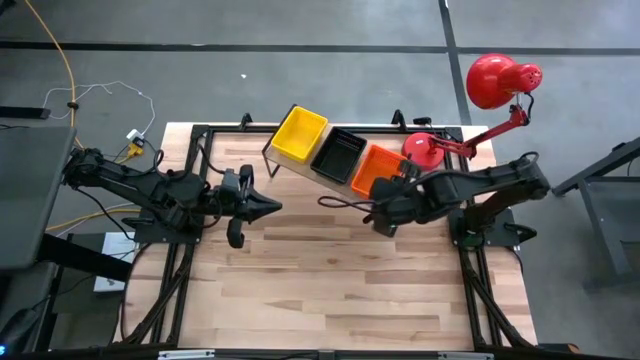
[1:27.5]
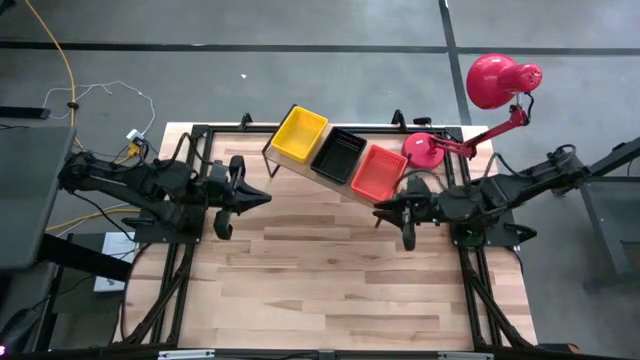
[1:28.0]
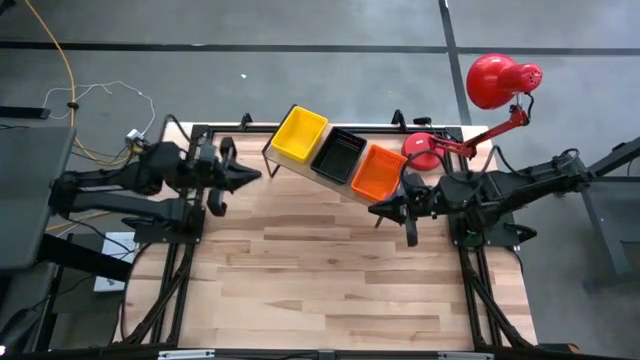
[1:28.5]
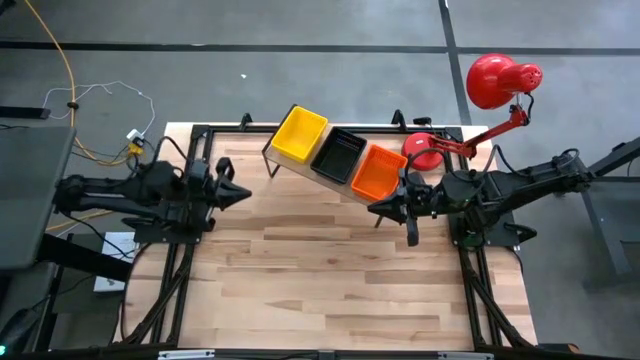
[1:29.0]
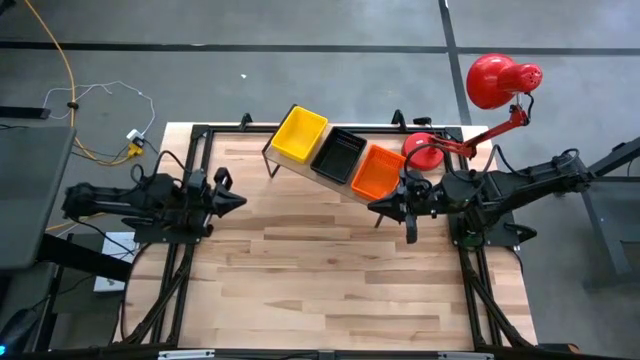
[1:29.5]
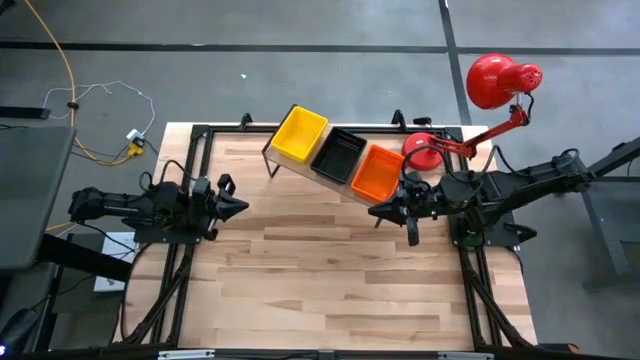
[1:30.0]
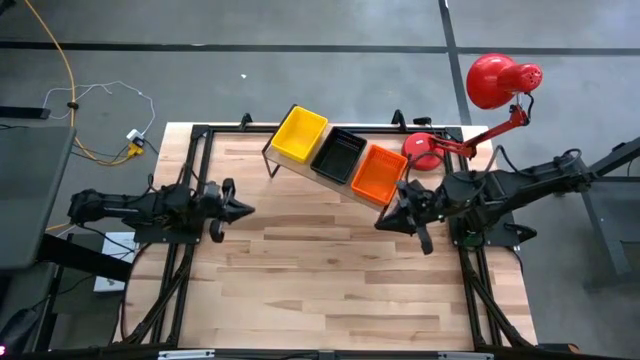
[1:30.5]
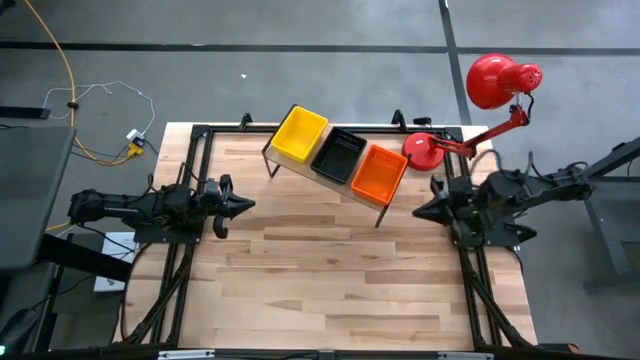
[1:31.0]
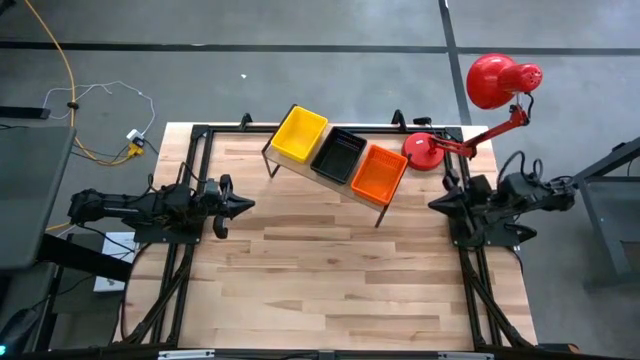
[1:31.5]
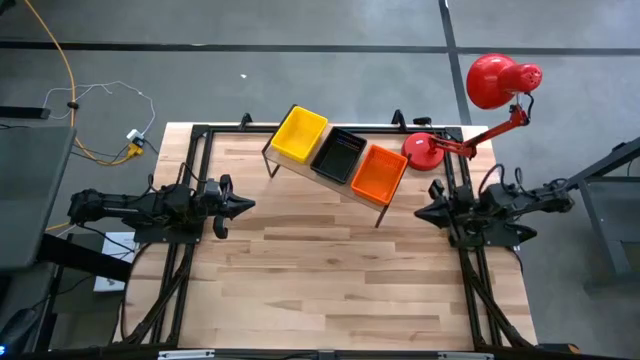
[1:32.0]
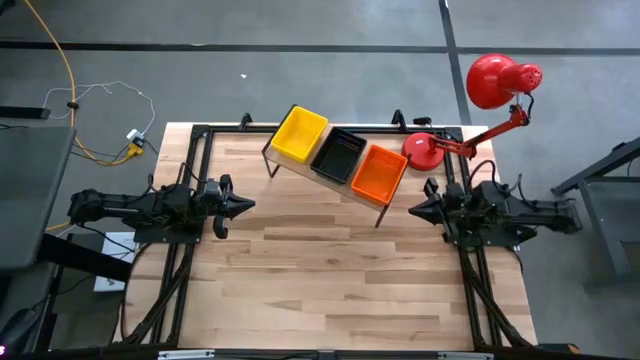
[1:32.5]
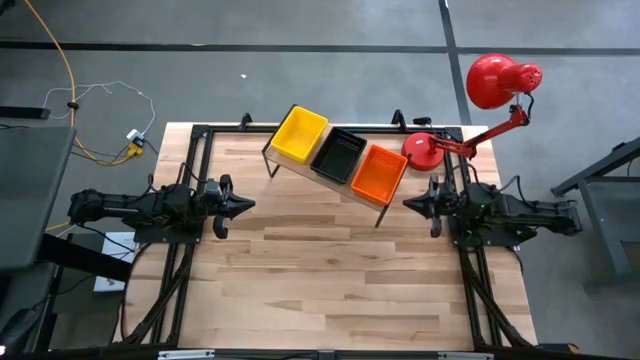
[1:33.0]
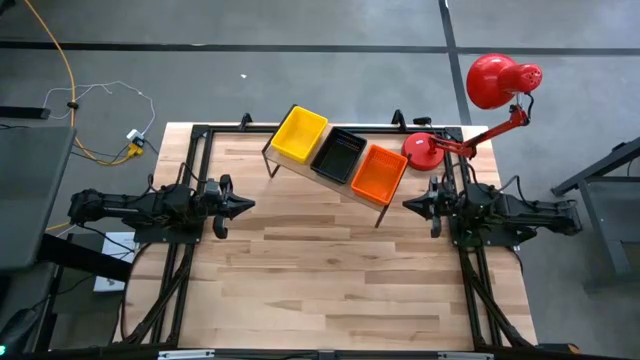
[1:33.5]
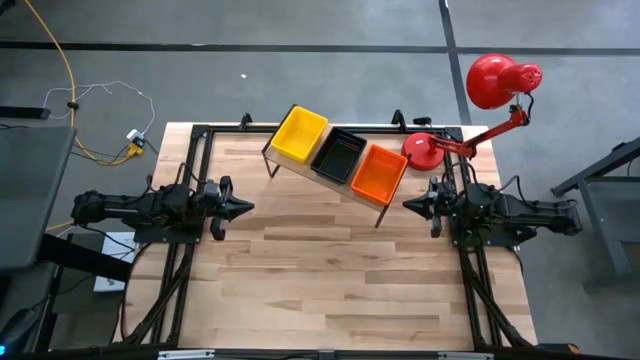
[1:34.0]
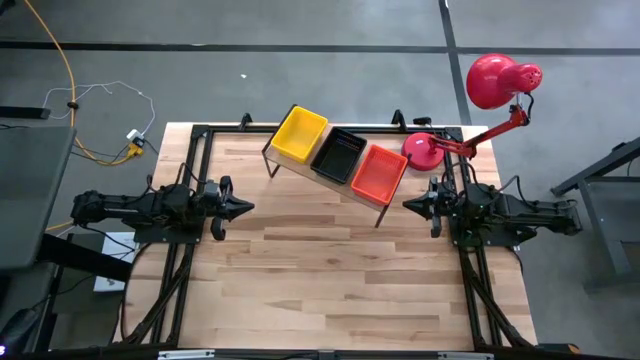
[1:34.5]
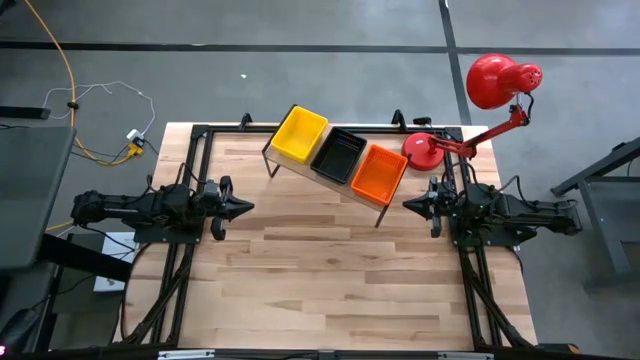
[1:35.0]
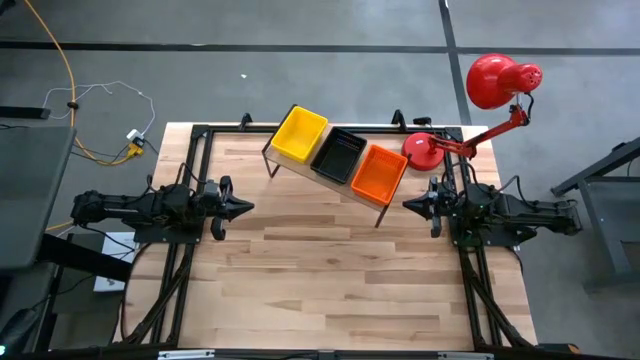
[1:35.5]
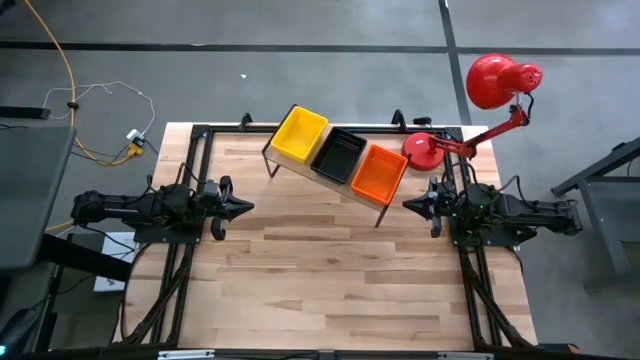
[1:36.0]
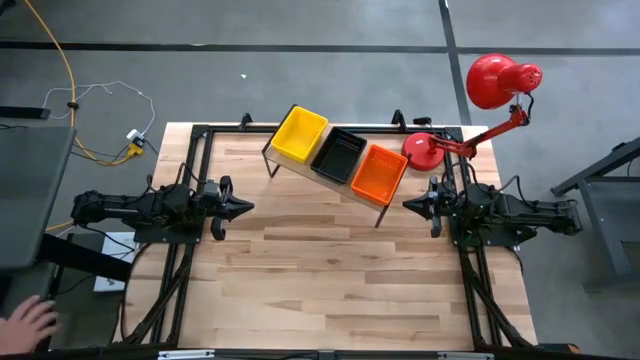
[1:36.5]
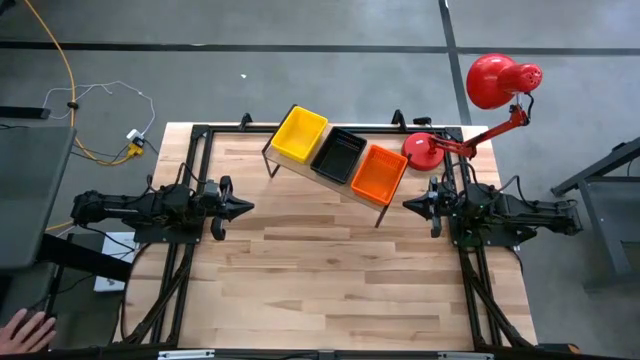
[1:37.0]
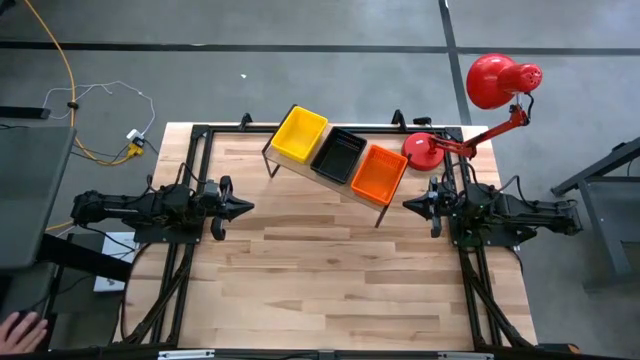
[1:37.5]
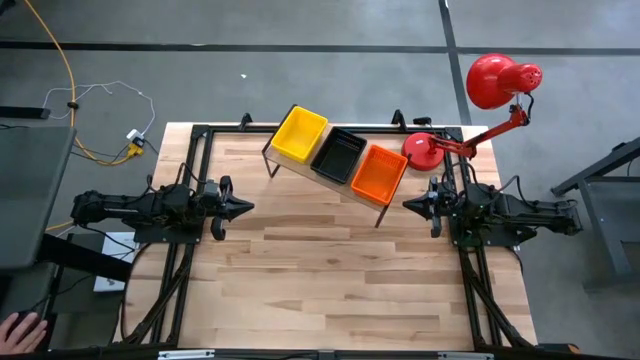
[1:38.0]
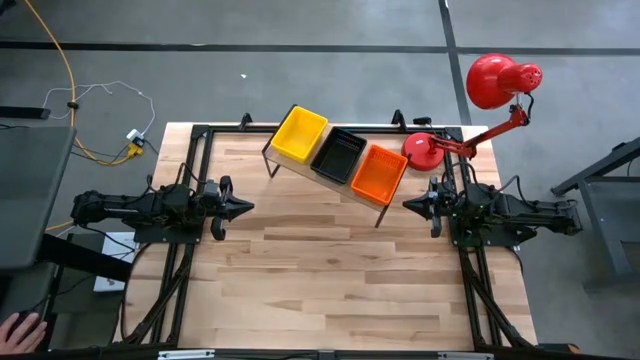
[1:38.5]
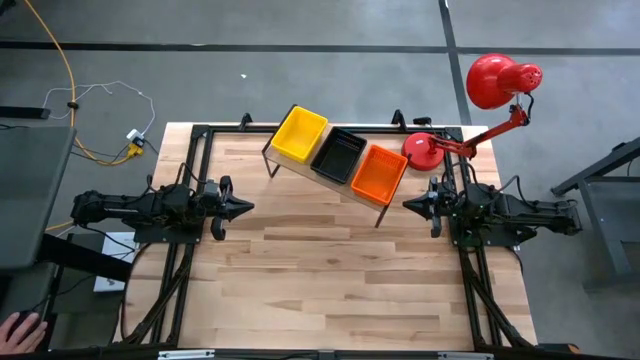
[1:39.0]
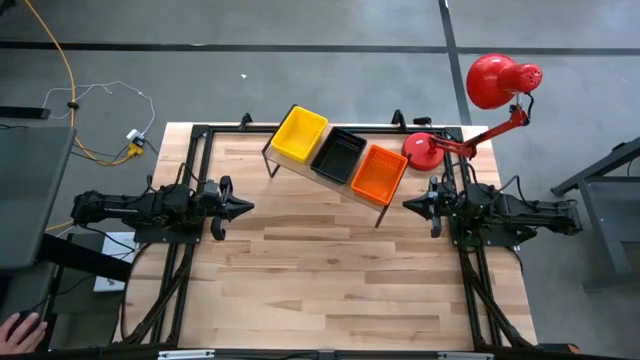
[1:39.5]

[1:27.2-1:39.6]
Task: Stack baskets on shelf by color
Return to Home Position

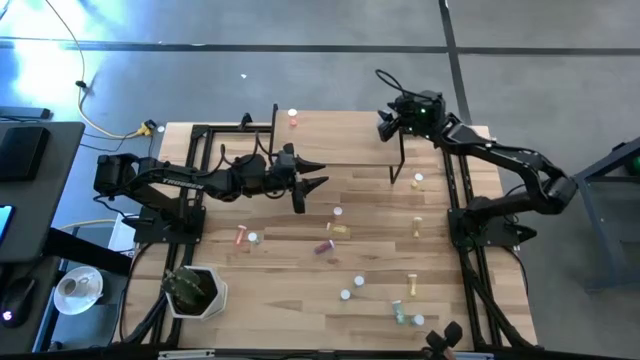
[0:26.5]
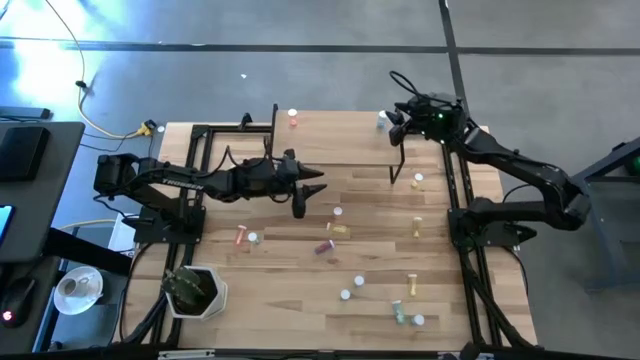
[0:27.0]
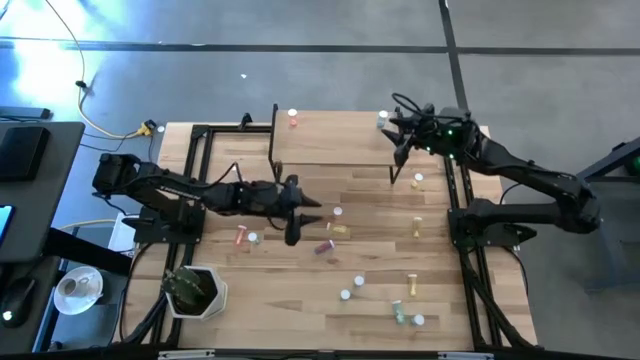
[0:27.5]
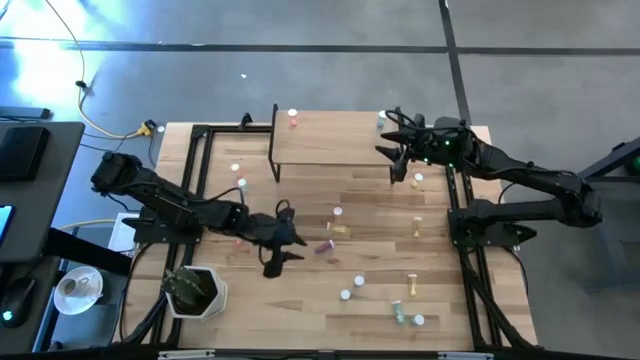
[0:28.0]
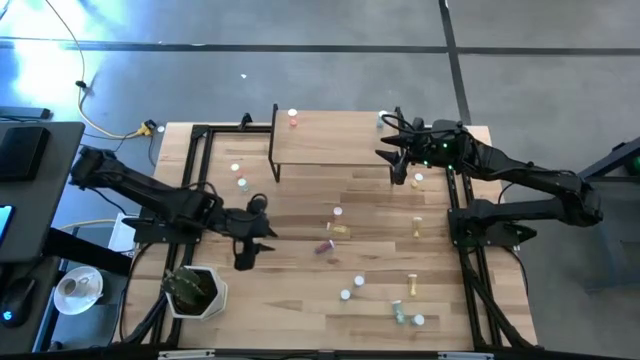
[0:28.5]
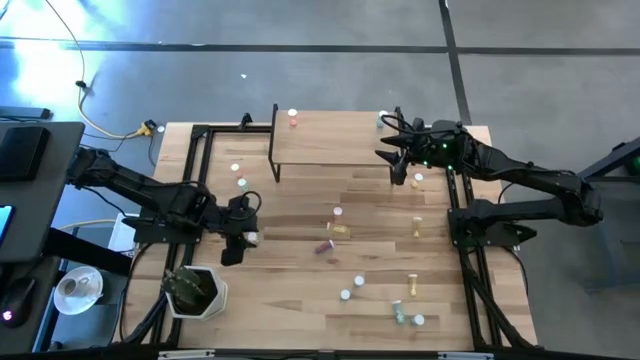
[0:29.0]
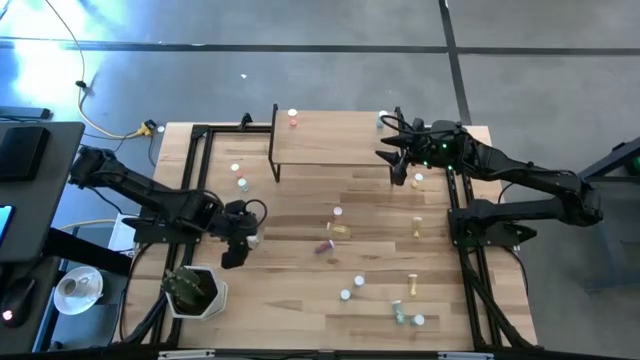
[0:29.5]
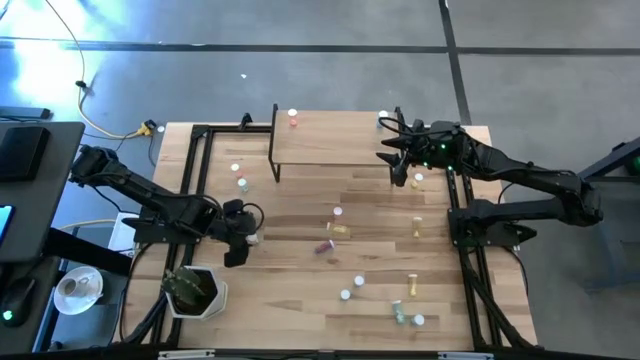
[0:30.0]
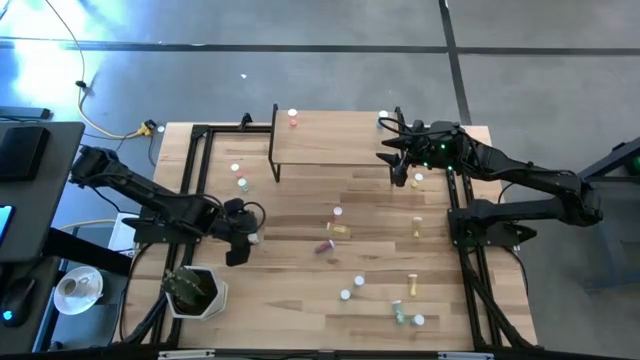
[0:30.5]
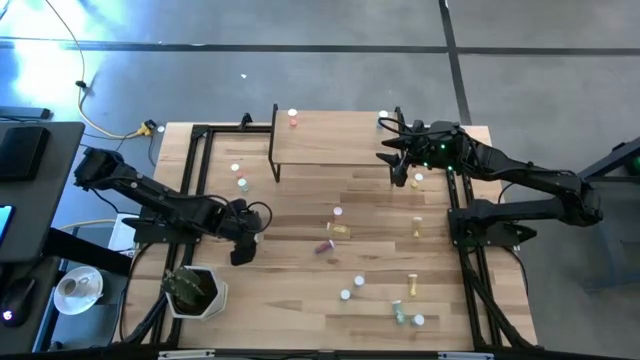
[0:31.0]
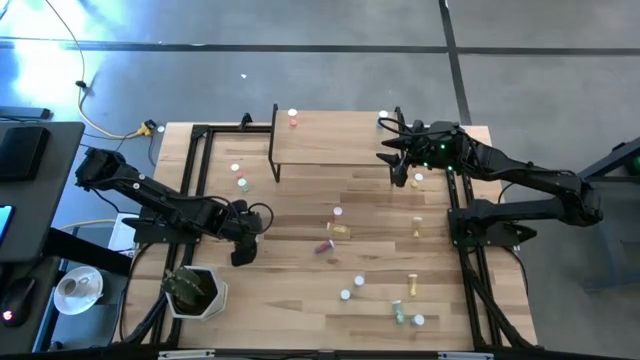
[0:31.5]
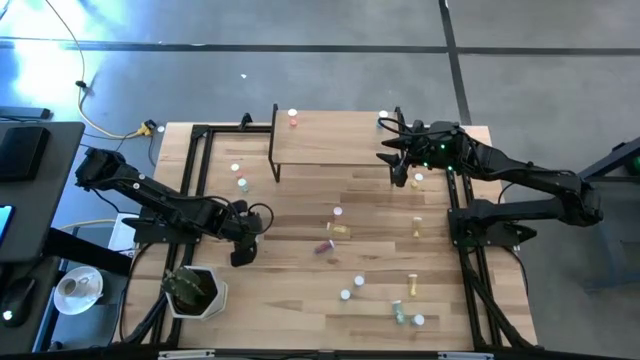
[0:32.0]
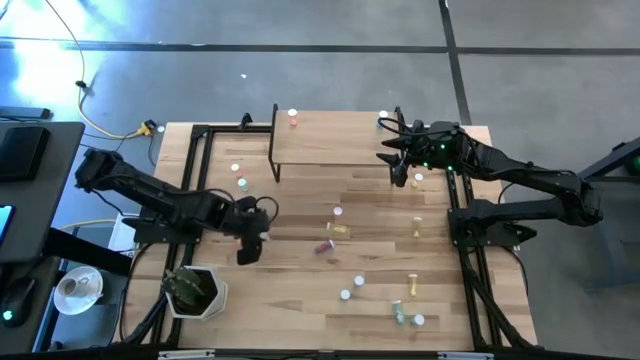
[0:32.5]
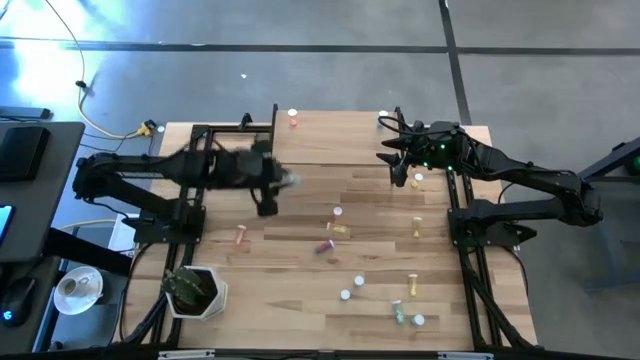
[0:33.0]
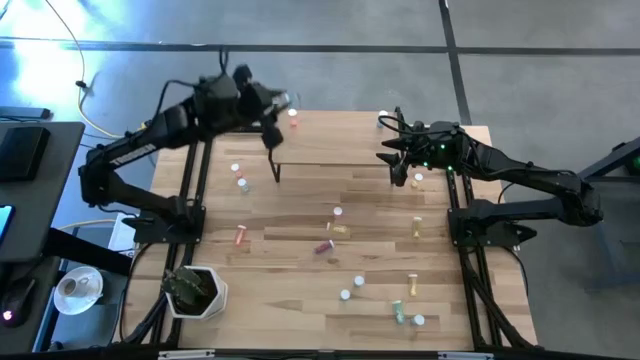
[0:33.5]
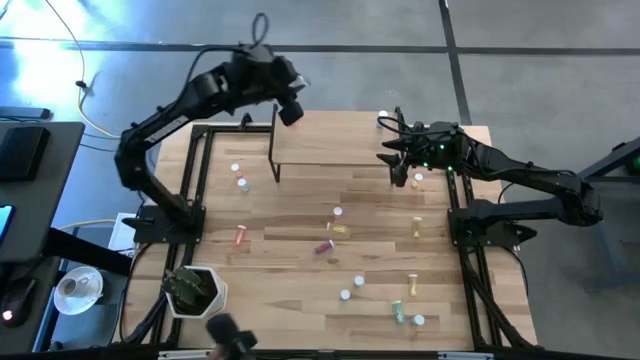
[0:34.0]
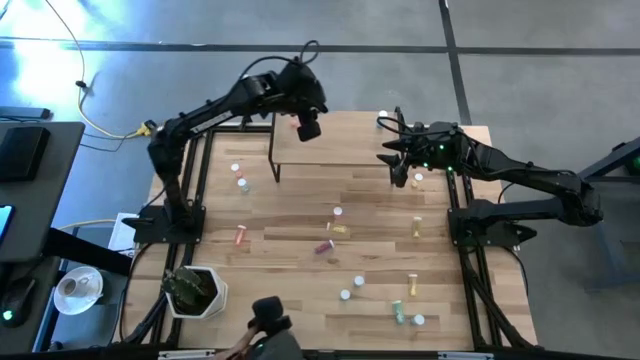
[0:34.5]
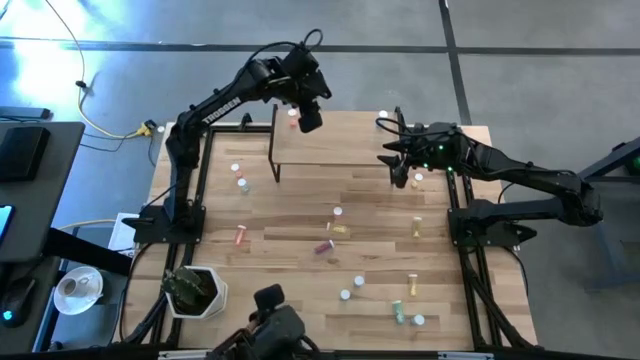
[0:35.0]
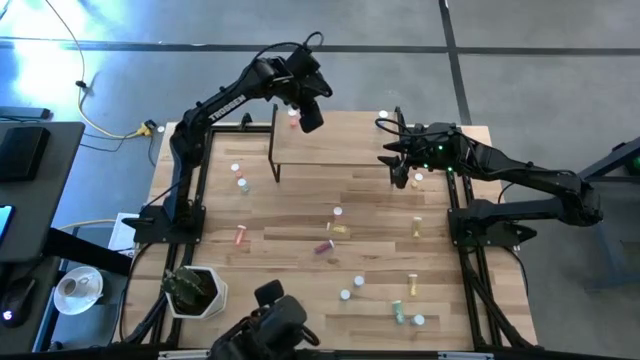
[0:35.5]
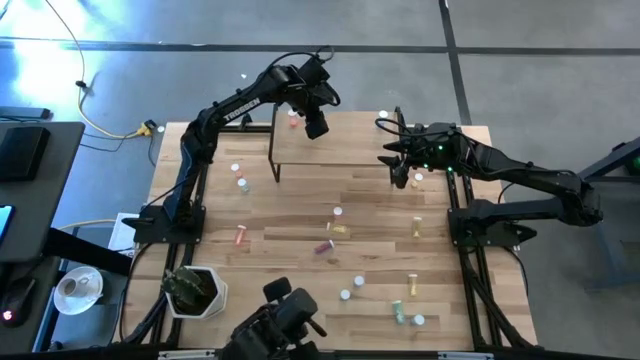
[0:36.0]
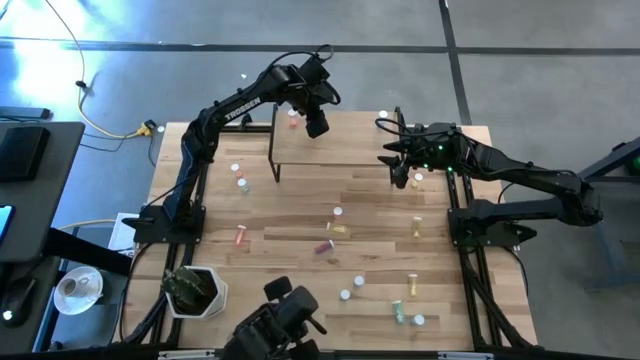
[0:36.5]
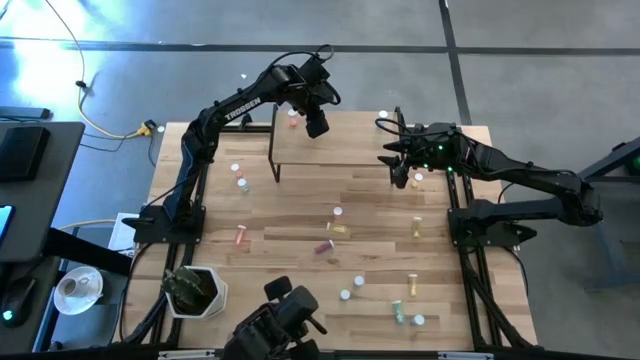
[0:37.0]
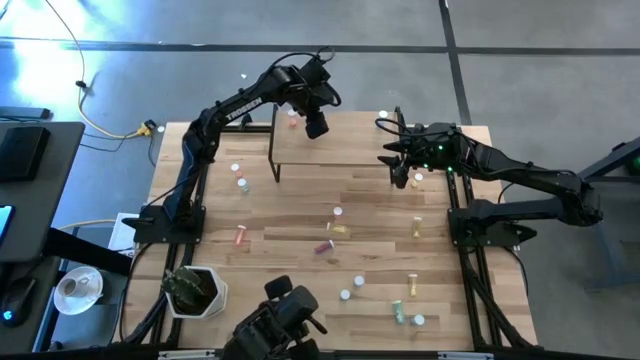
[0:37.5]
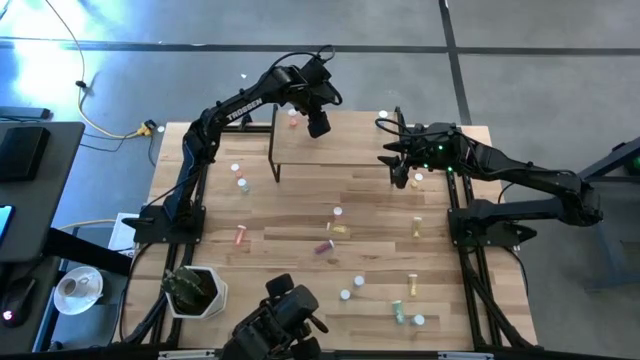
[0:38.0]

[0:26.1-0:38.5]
Task: Pick and place medicine bottles onto shelf by color
Put the light blue medicine bottle on the shelf
